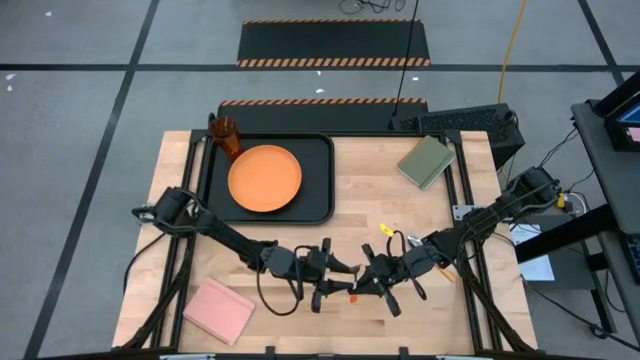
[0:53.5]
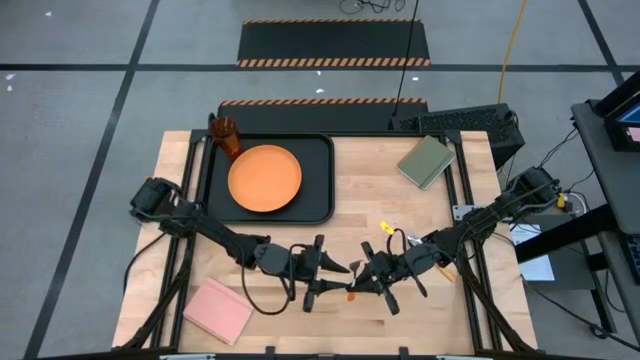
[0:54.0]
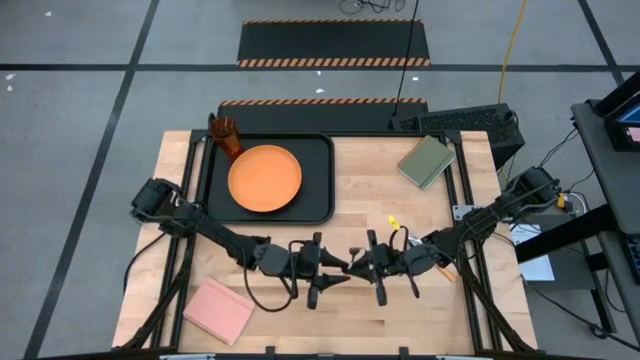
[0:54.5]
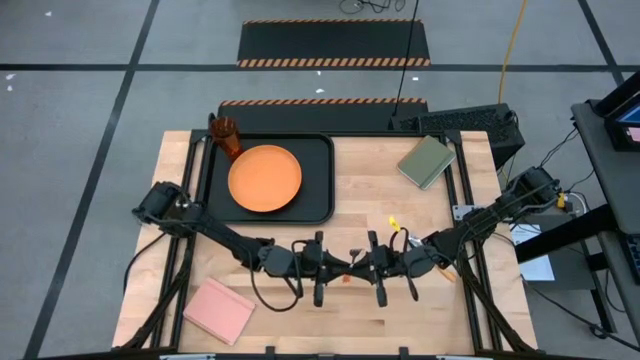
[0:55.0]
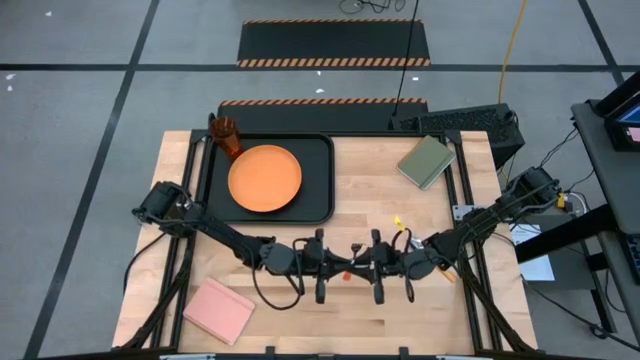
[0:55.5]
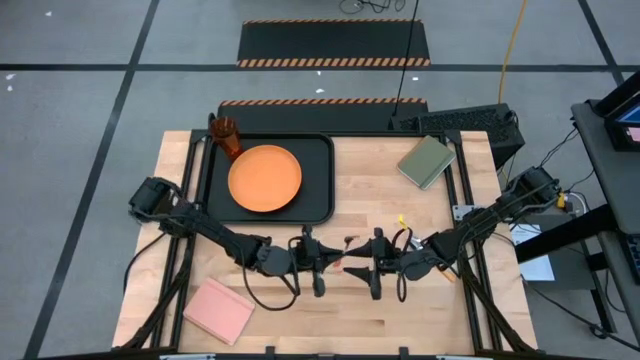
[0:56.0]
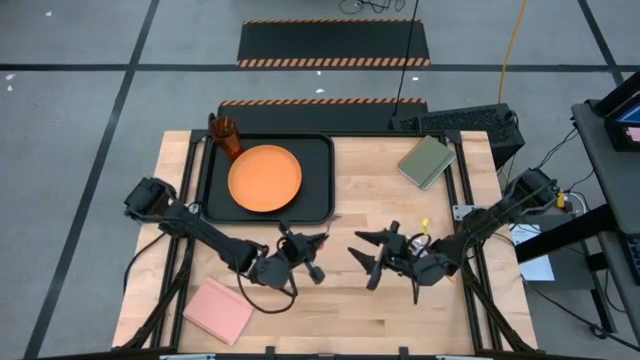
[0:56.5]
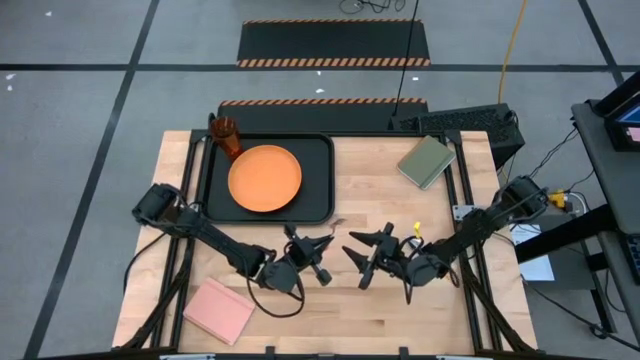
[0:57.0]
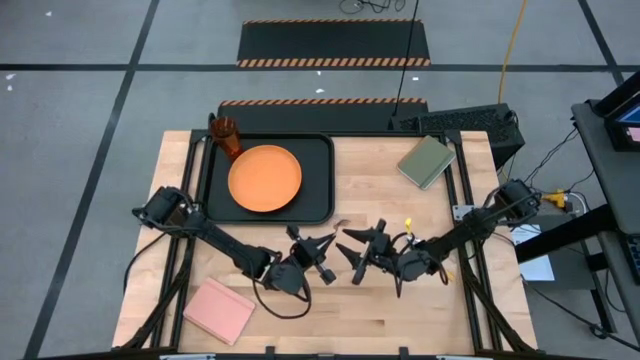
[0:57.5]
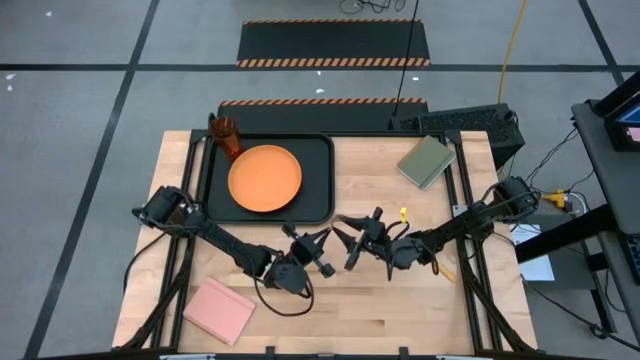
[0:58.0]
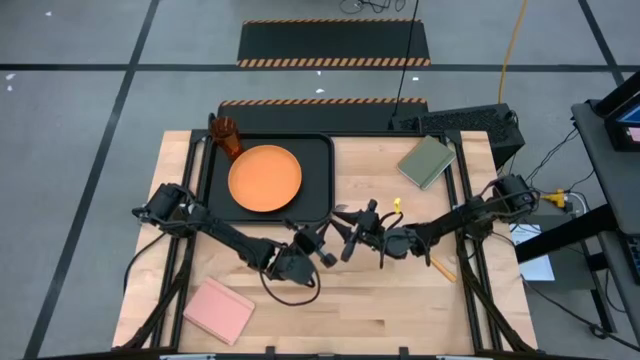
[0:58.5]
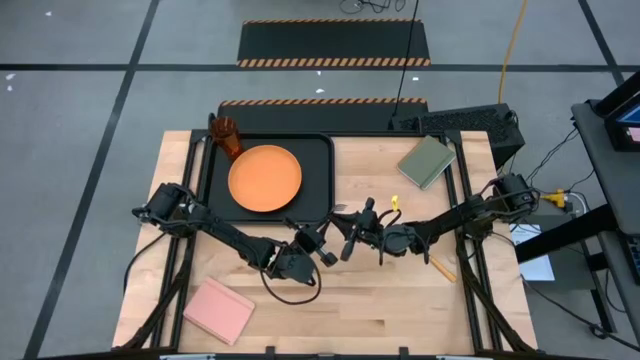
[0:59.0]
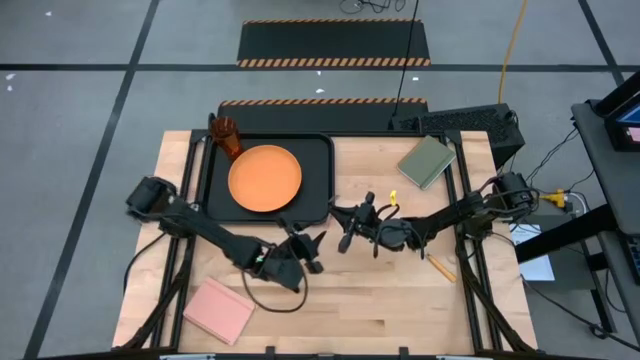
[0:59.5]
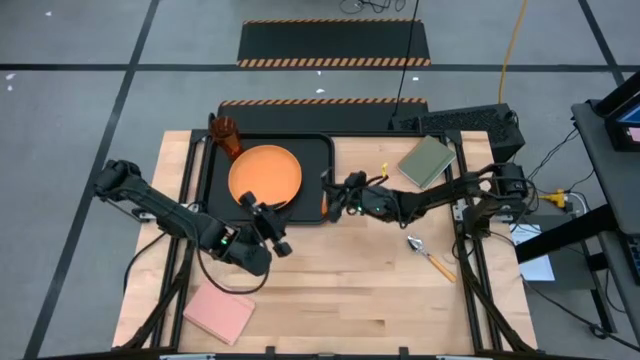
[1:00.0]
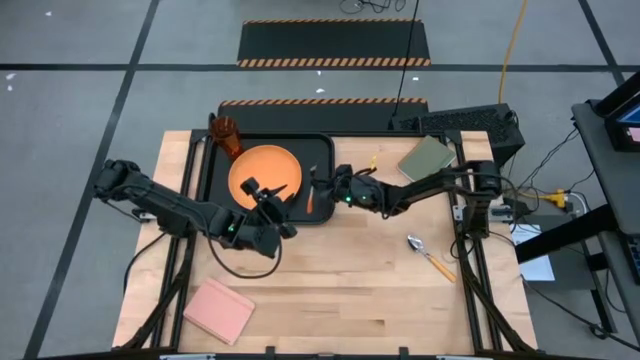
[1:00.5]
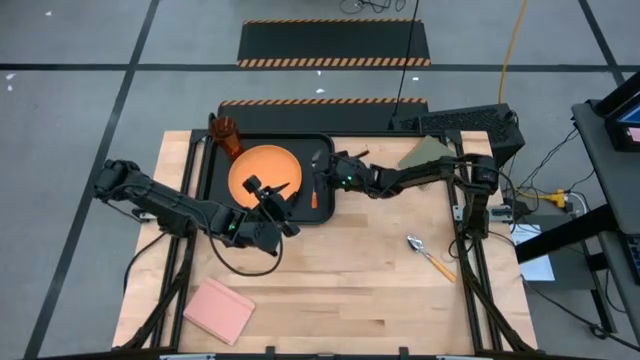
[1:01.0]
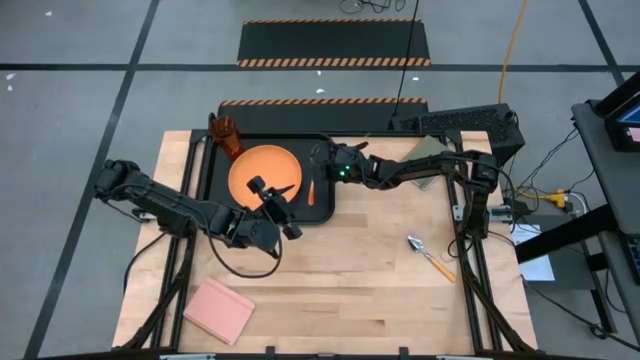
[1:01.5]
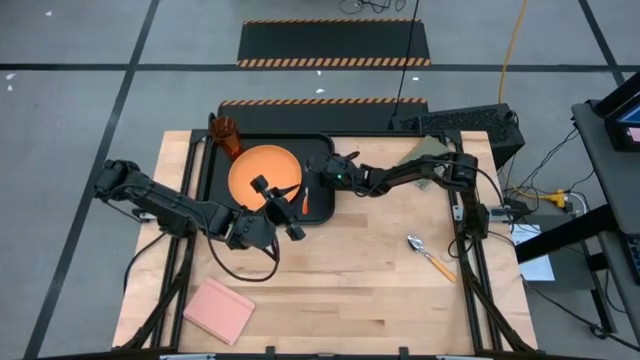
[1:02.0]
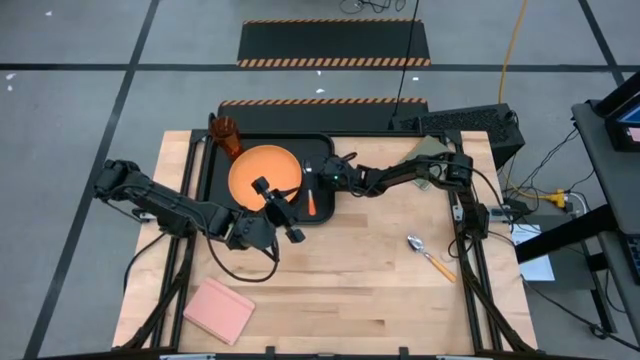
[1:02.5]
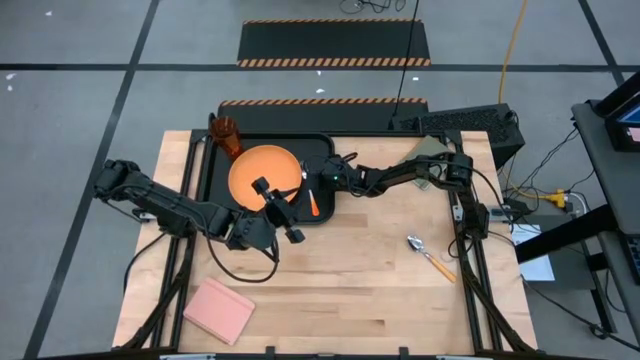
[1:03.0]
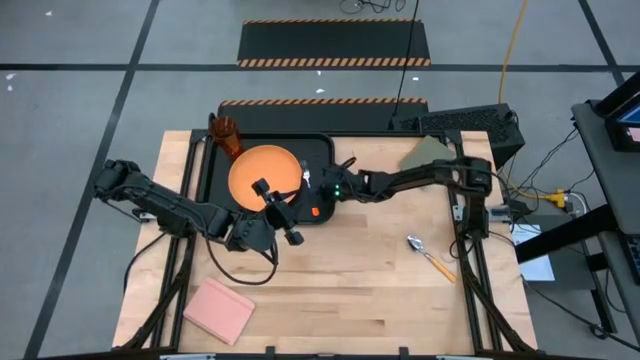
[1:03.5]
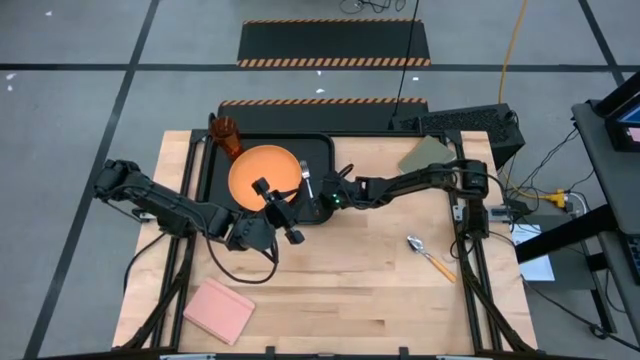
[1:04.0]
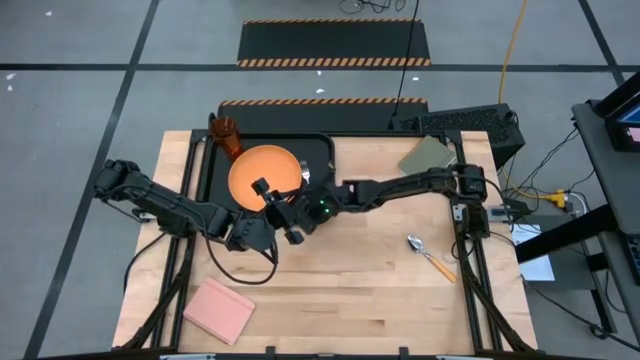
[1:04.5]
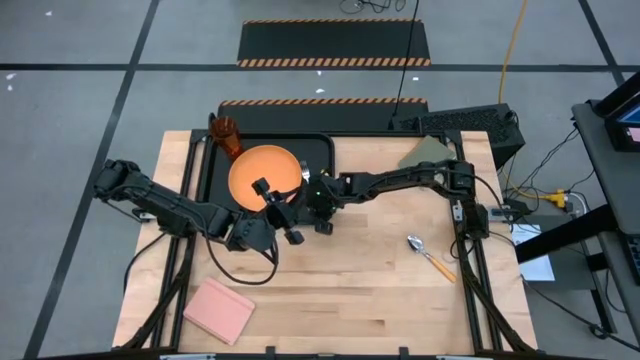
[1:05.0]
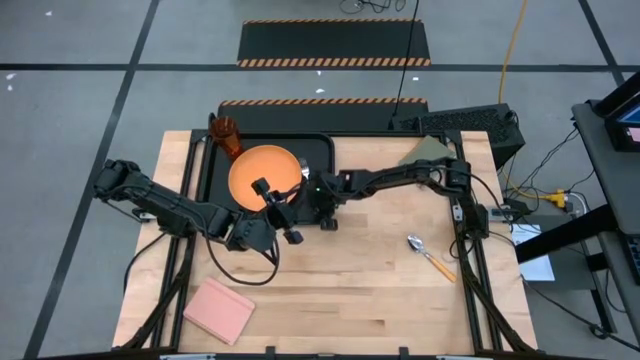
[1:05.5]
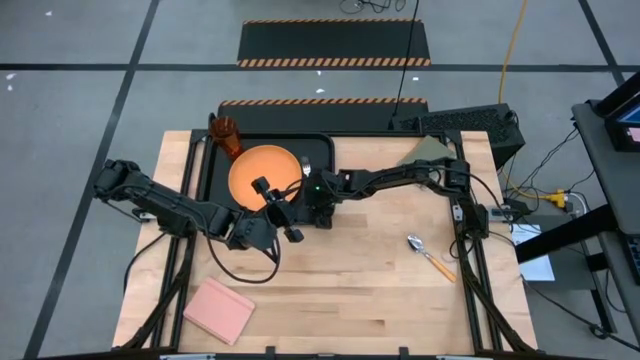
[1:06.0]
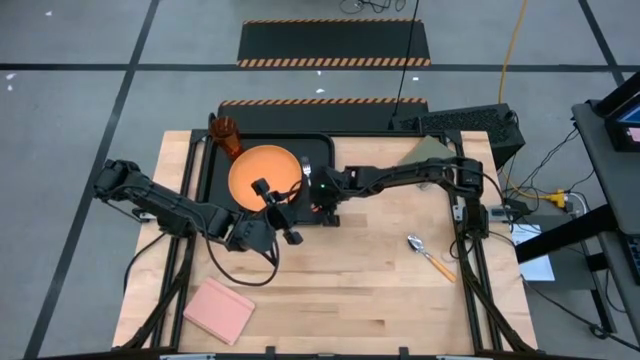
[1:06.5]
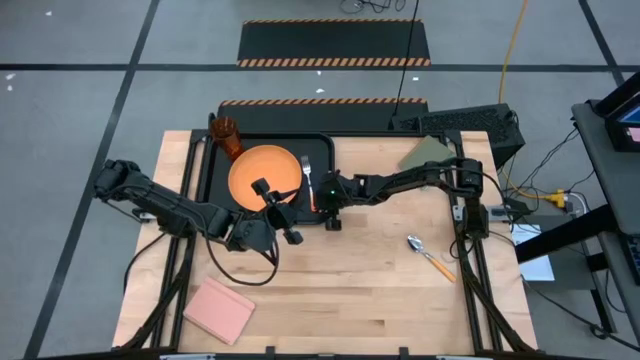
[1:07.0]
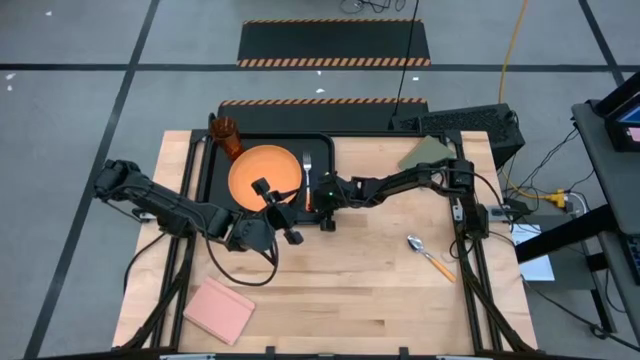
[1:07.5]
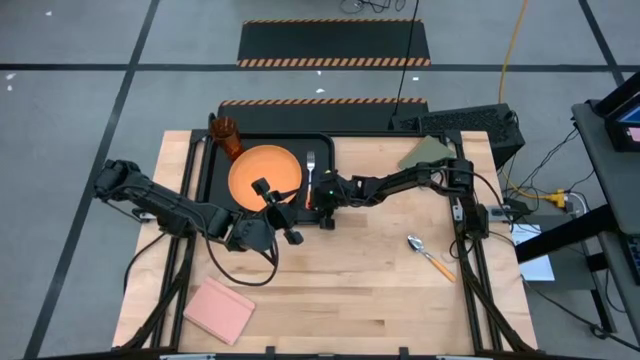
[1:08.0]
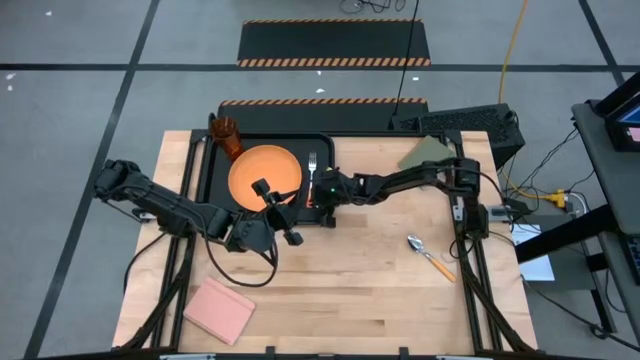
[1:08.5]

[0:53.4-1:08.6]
Task: Pick and place plate/cup/fork/spoon on tray
Put the orange fork on the black tray

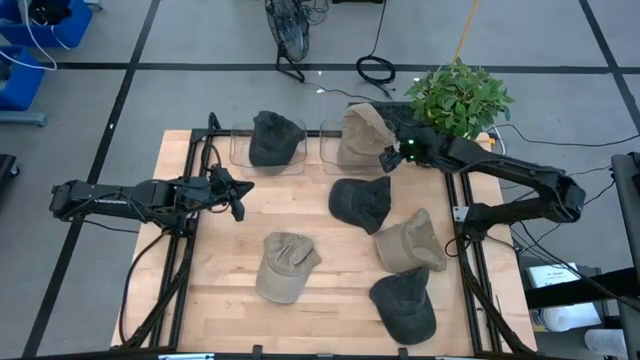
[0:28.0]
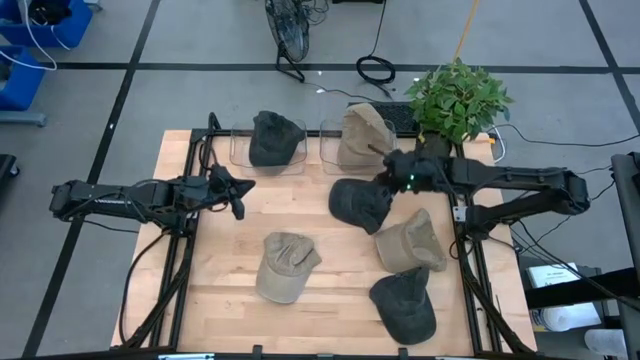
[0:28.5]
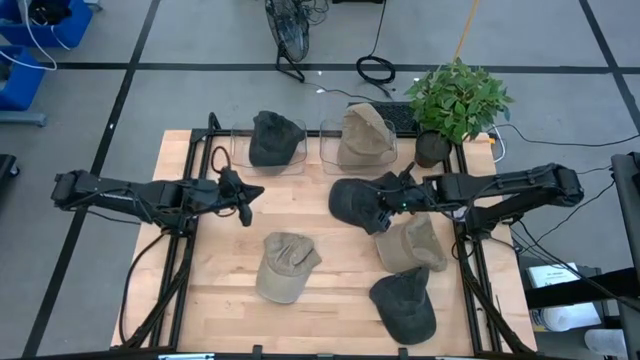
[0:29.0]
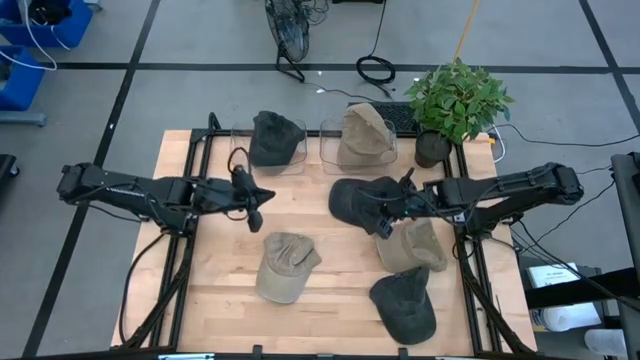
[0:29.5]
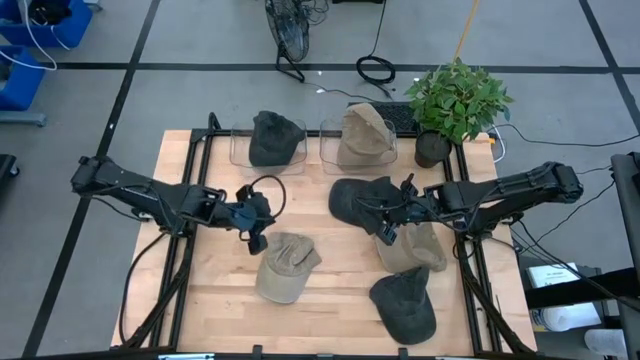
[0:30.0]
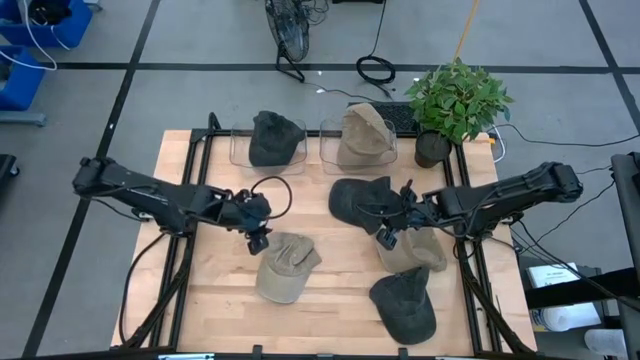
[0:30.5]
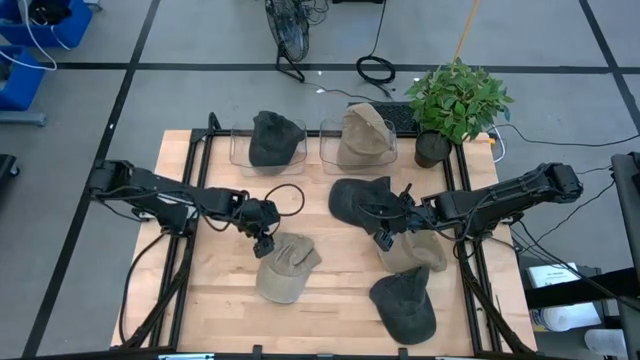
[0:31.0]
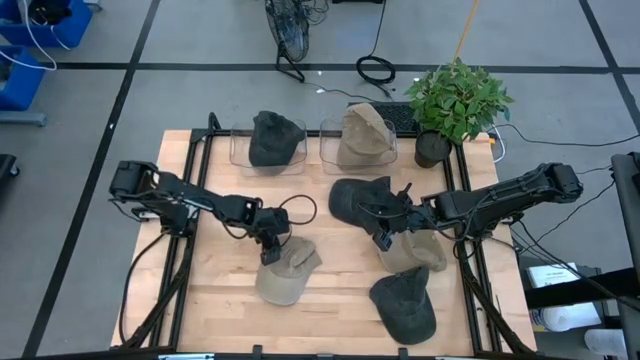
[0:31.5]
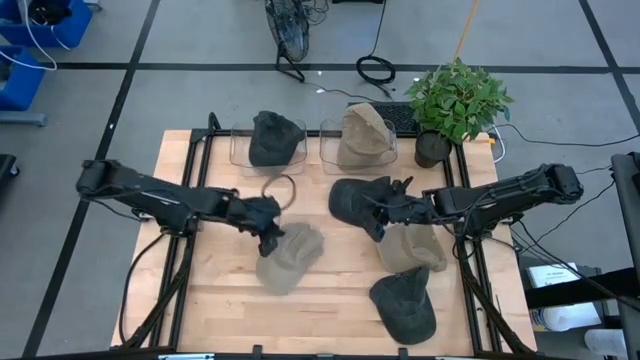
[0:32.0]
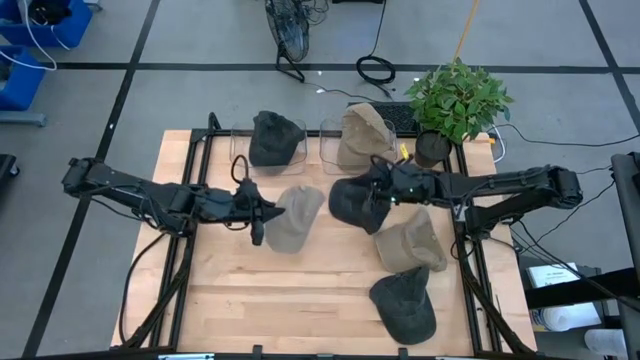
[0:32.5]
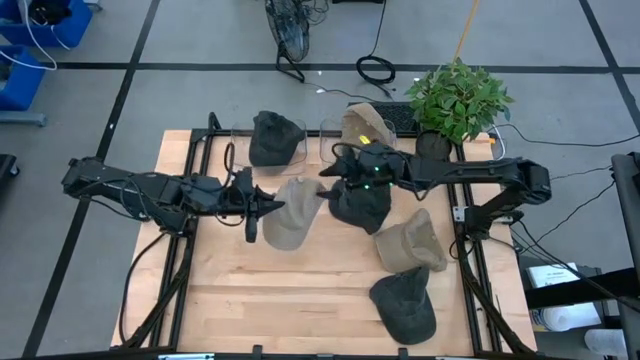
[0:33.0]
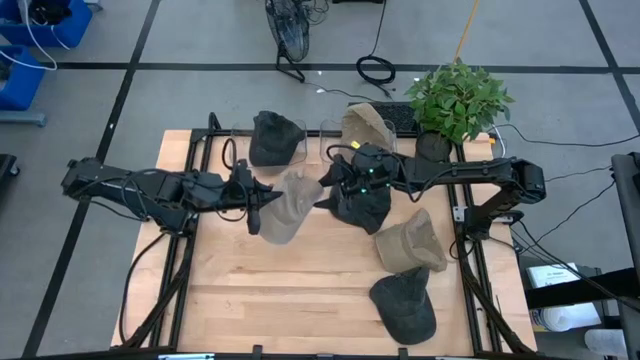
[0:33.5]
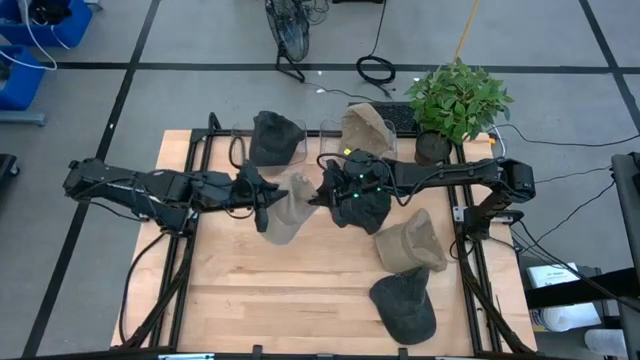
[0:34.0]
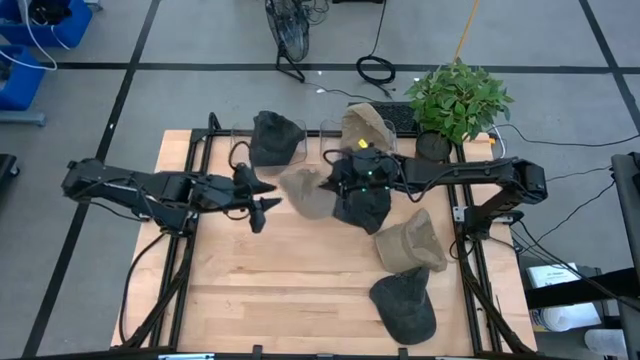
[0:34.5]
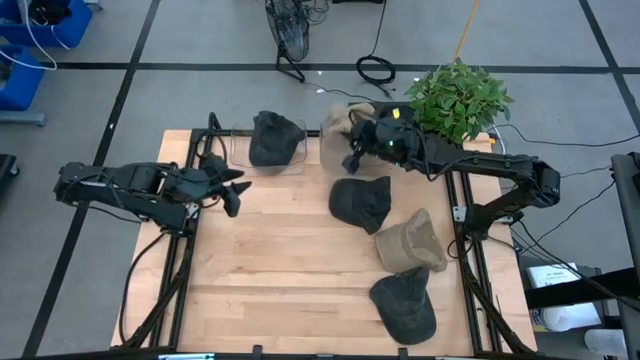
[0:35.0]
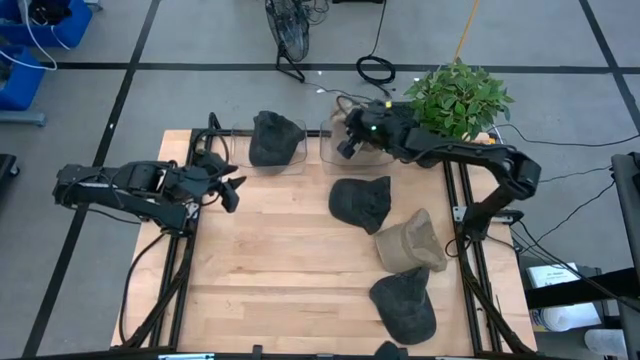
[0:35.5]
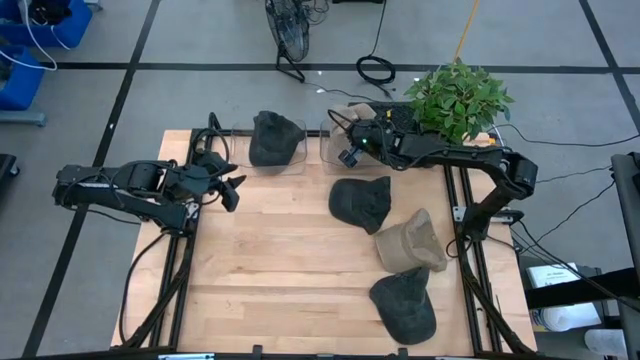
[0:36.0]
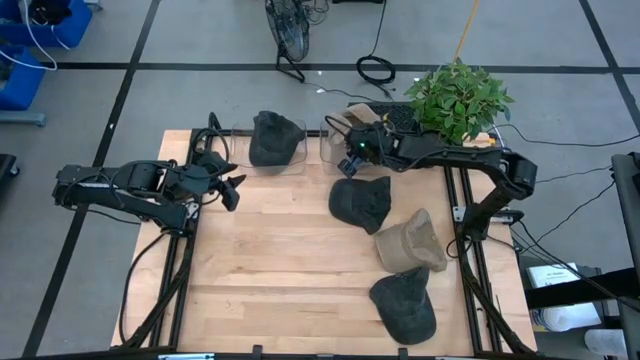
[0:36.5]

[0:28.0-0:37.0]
Task: Pick & Place hat
Put the brown cap into the right transparent bin
